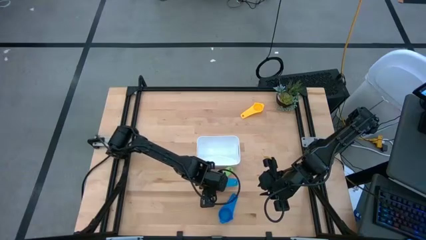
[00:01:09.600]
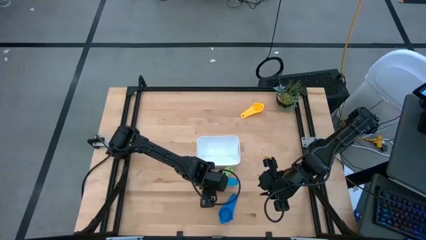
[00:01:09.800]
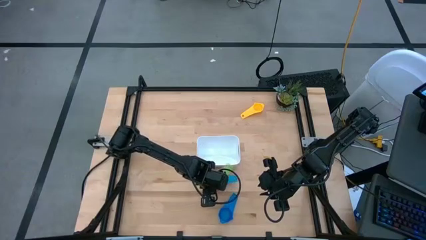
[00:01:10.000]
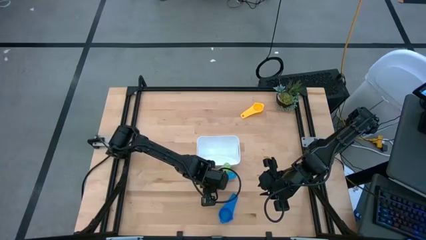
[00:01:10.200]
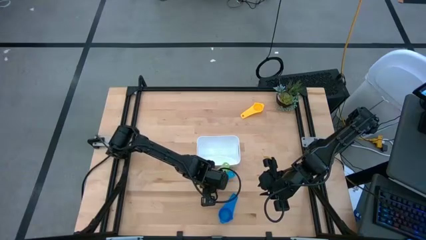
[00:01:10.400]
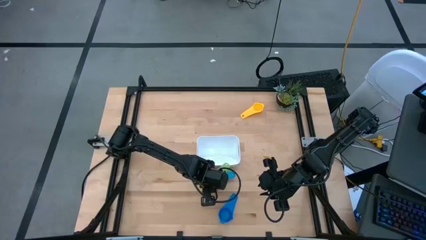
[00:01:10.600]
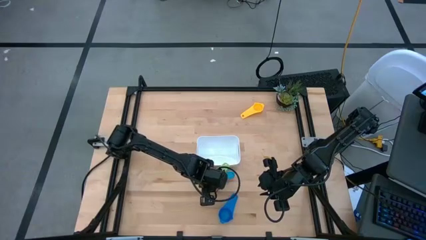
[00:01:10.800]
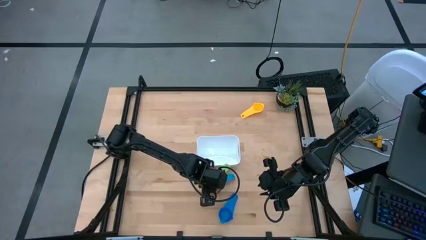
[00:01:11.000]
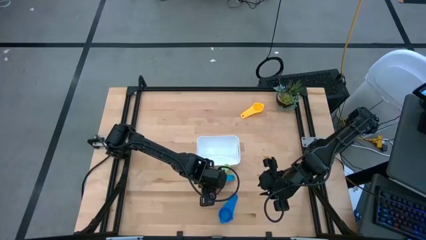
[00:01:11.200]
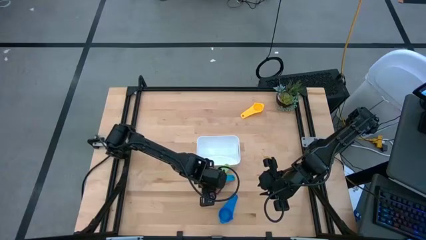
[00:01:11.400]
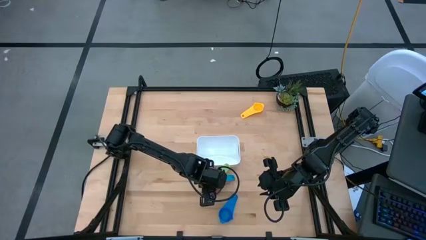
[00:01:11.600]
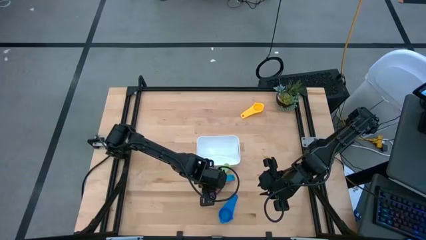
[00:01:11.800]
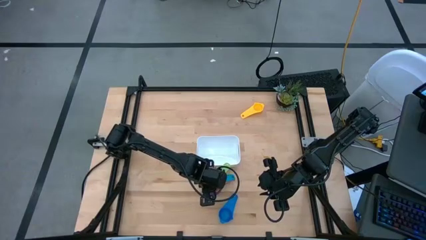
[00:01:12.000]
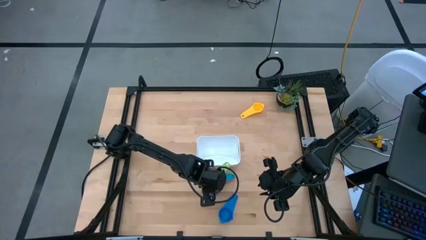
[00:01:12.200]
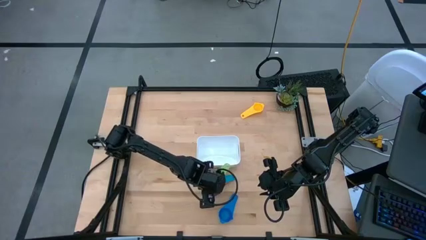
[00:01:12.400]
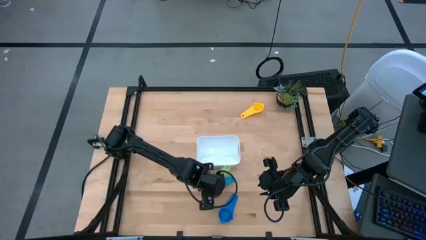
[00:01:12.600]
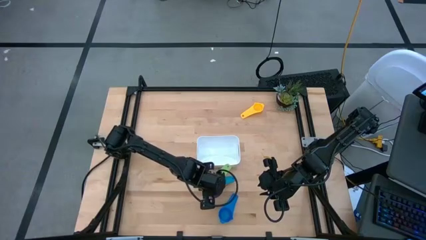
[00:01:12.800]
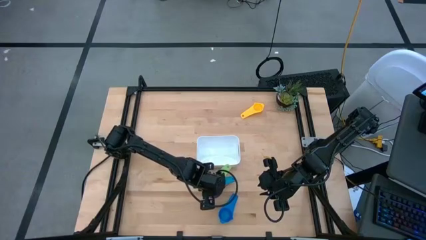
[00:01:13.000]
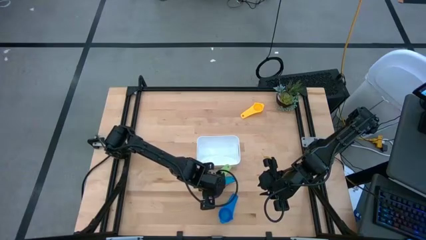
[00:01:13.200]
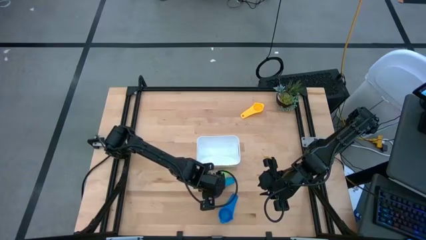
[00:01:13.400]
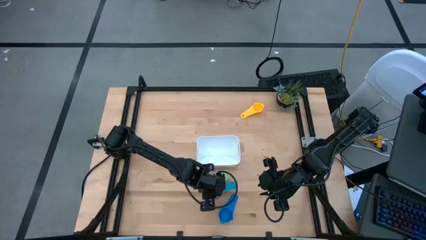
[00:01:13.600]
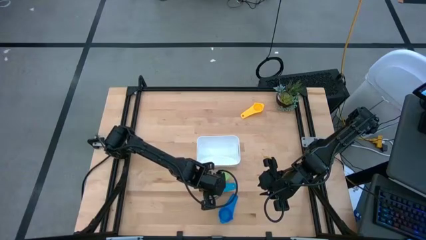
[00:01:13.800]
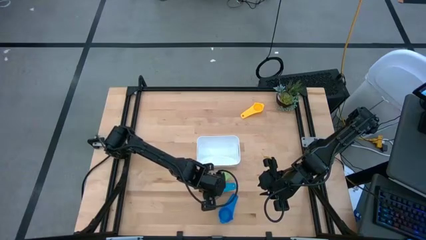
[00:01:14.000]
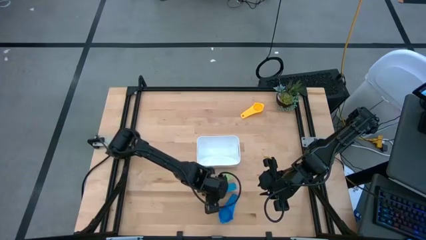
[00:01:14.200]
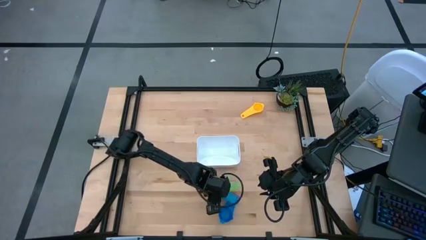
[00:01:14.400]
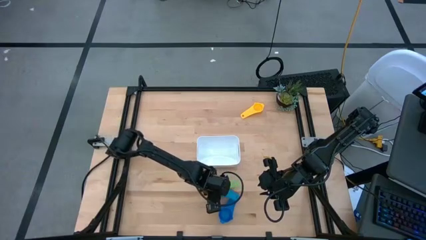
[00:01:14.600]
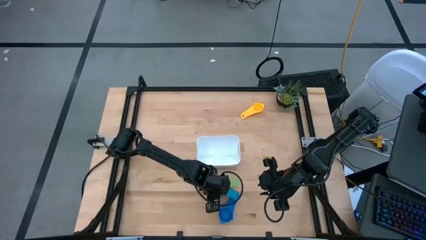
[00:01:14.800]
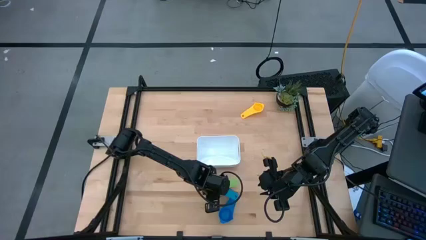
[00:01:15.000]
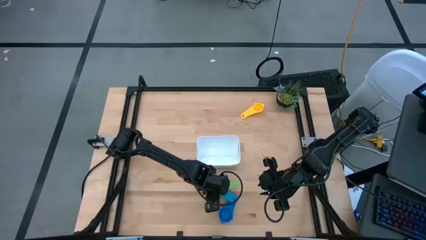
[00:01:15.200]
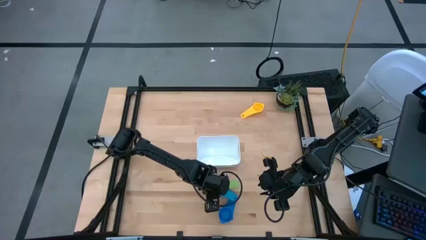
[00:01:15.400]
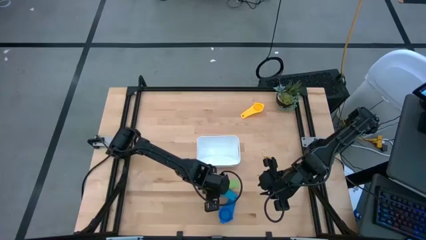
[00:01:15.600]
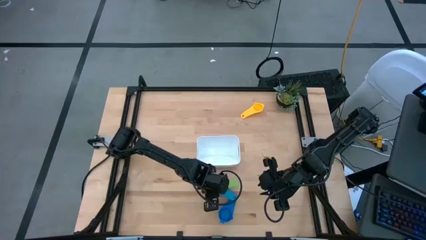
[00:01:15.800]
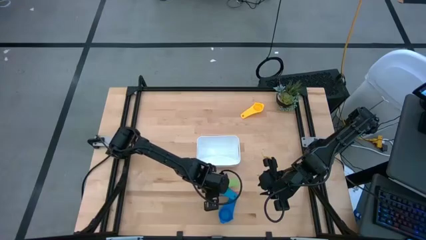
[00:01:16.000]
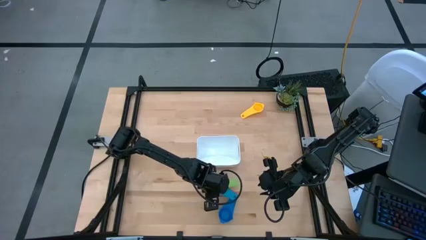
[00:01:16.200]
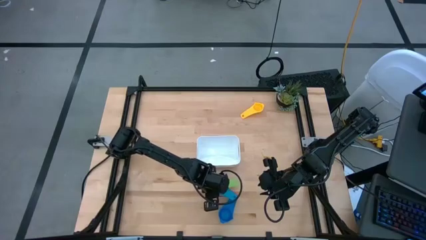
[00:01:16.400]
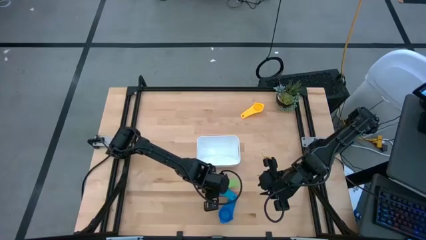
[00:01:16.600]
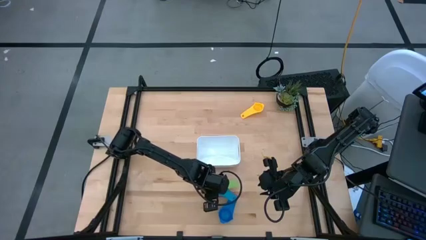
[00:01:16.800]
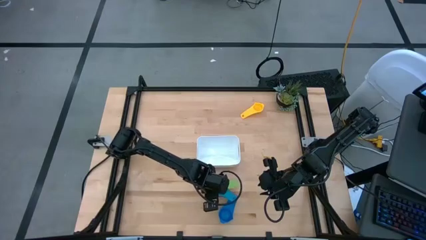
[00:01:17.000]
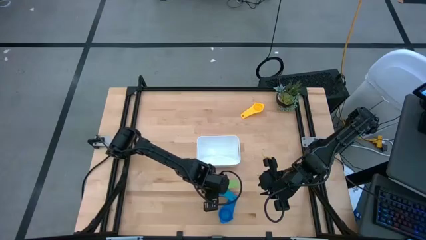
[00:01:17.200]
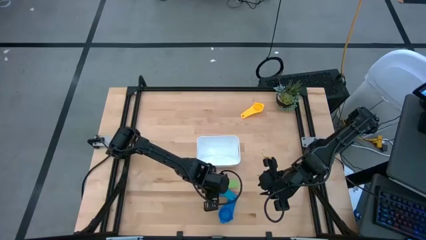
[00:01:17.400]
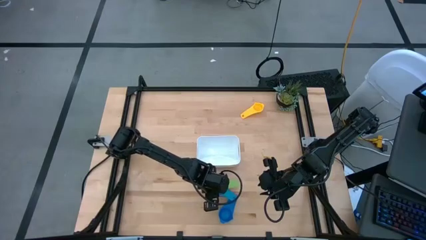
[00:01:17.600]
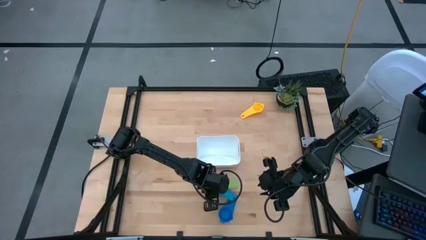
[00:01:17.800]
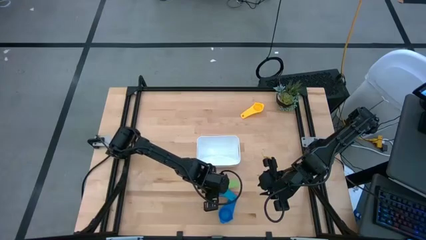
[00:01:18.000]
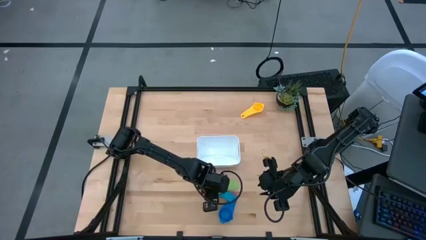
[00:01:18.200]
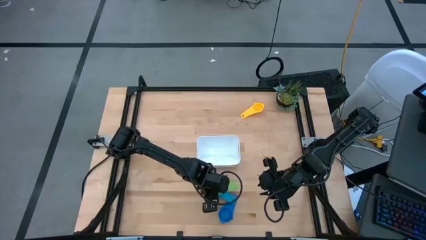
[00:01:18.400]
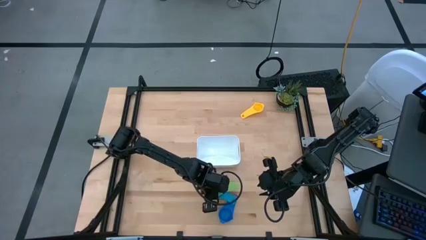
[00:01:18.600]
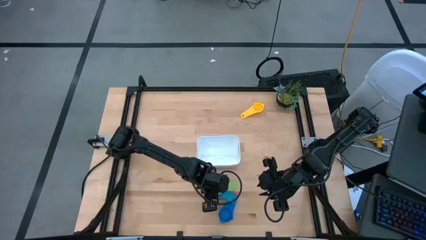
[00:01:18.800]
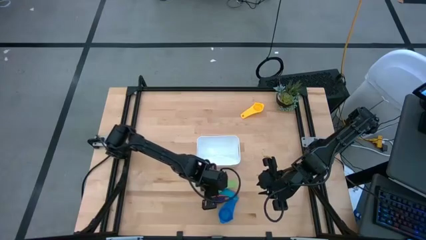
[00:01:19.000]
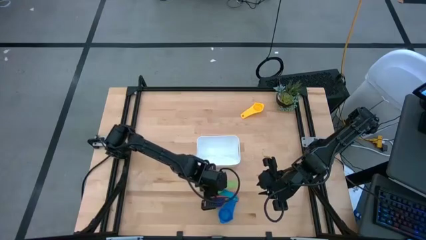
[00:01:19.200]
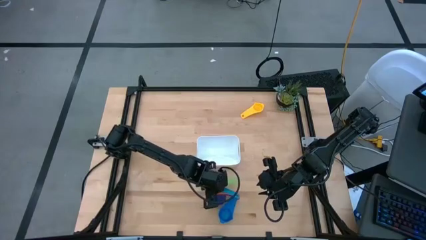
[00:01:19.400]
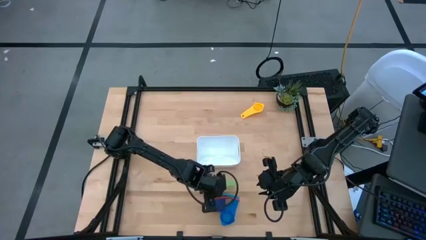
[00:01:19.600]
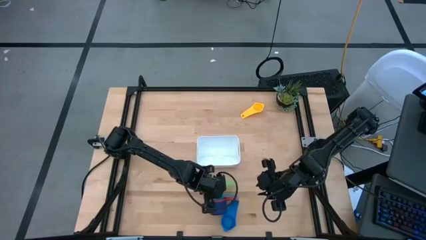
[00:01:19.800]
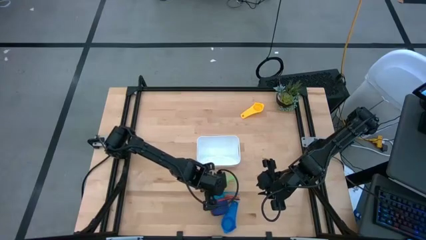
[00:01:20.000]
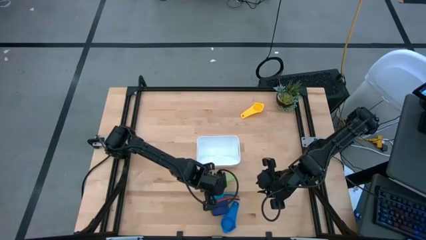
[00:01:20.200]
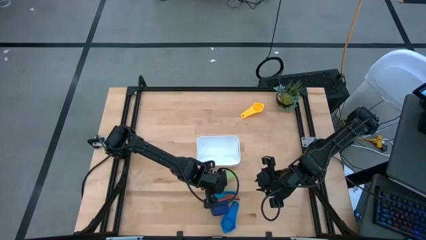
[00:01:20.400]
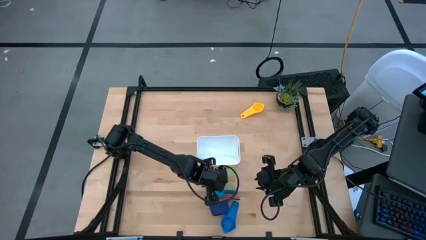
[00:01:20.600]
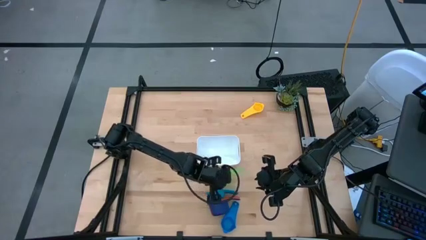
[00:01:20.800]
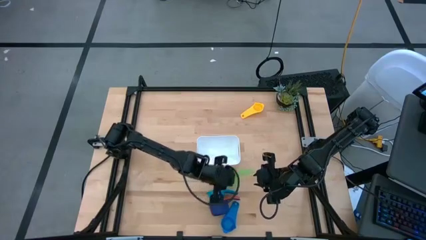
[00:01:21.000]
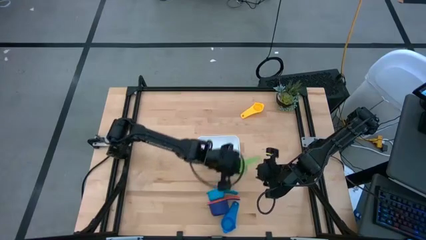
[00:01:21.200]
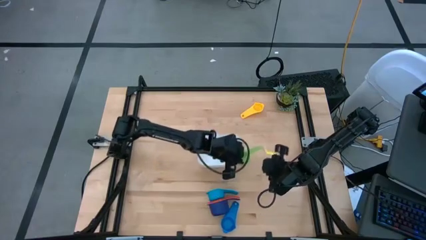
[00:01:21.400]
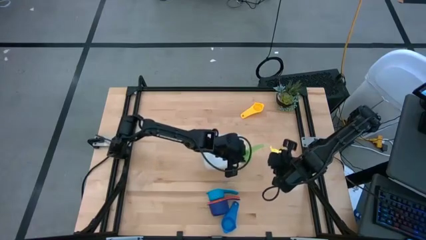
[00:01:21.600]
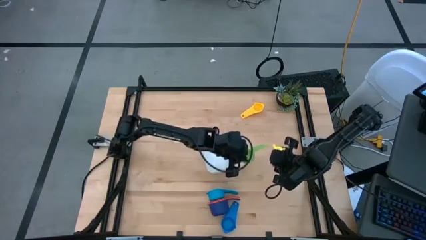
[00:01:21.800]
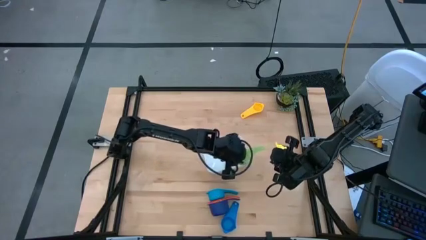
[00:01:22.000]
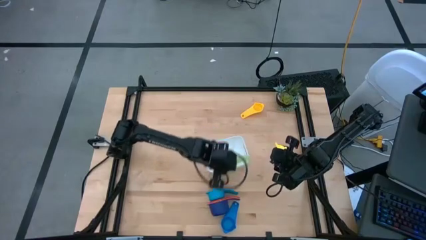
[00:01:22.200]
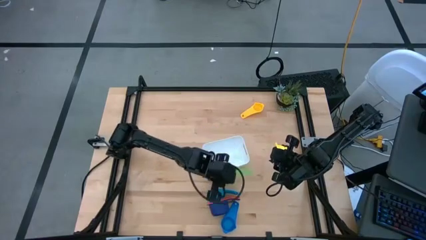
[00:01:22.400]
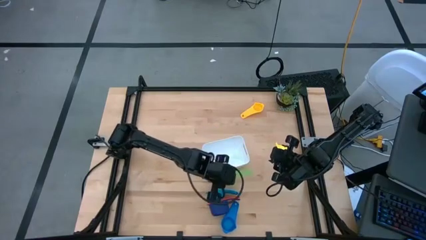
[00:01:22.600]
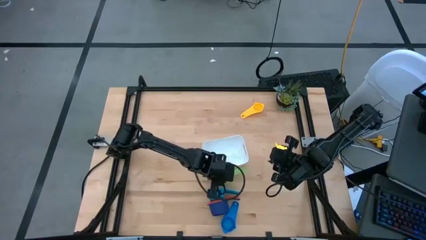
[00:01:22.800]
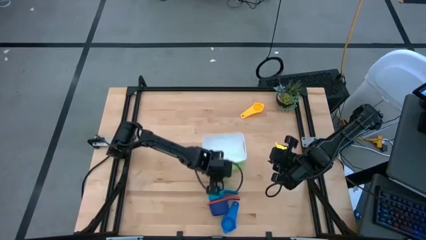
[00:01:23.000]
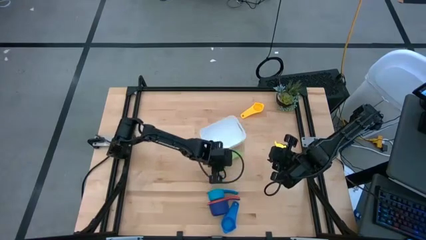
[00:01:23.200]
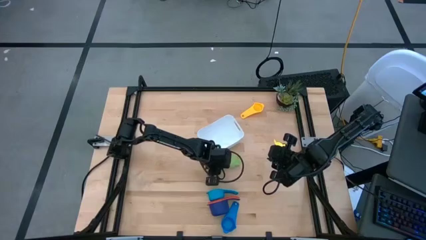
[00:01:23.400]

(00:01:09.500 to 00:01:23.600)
Task: Nest measuring cups in basket
Stack the green measuring cup on top of the stacked measuring cups
